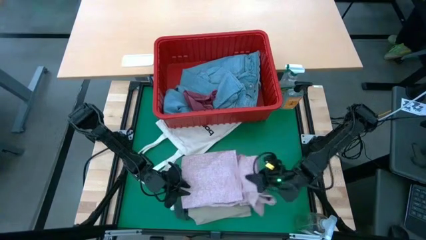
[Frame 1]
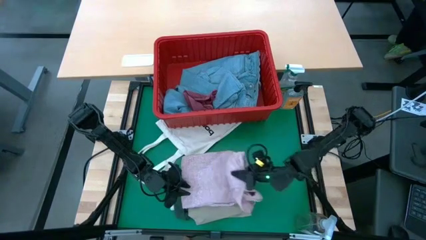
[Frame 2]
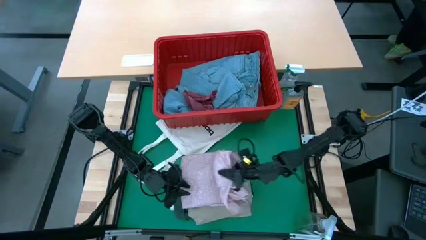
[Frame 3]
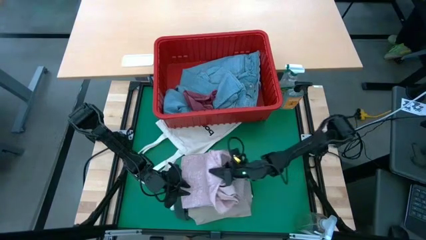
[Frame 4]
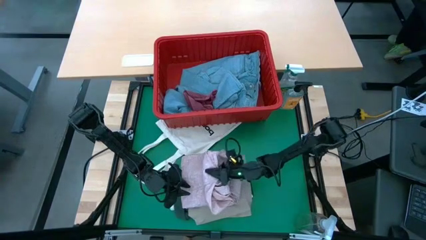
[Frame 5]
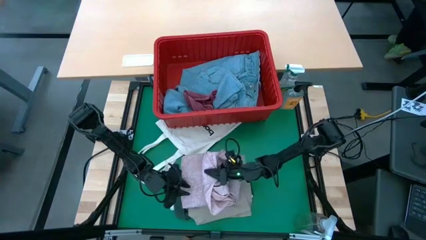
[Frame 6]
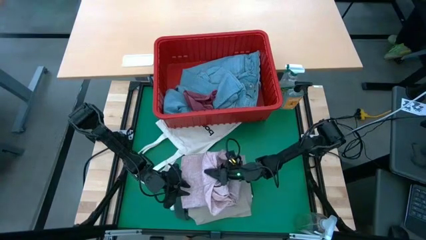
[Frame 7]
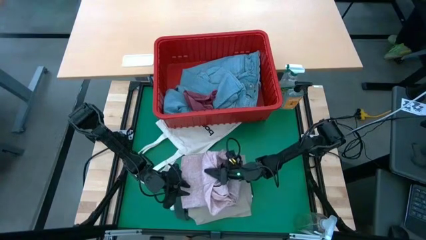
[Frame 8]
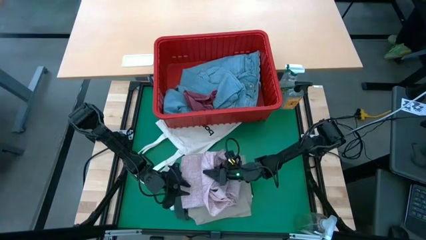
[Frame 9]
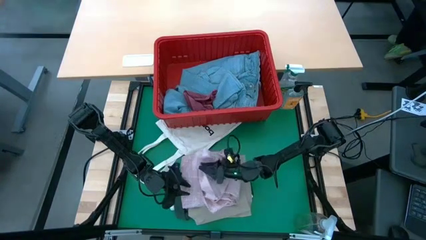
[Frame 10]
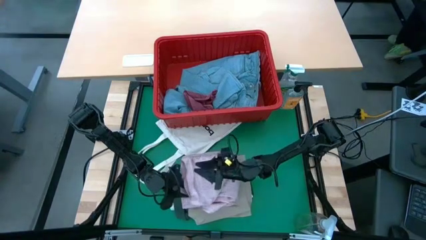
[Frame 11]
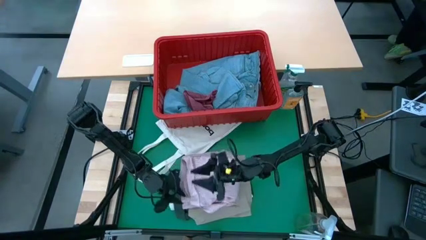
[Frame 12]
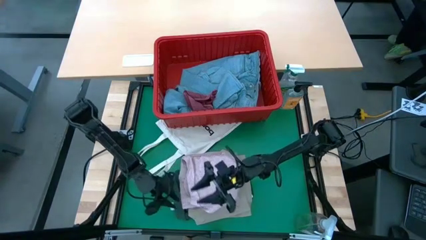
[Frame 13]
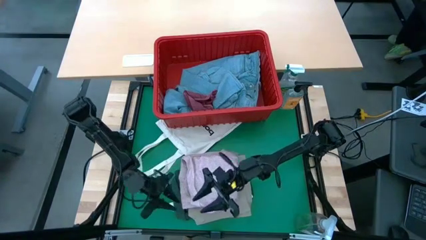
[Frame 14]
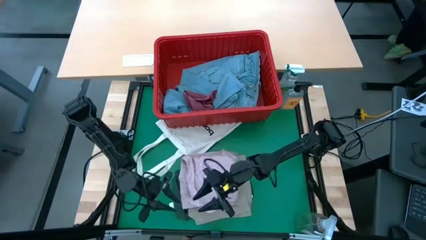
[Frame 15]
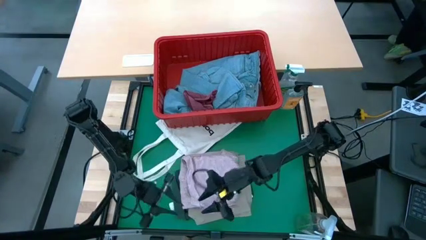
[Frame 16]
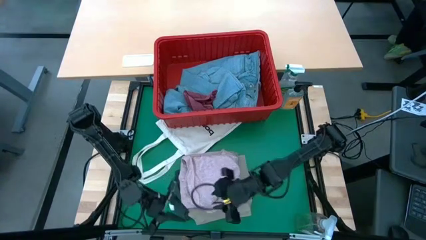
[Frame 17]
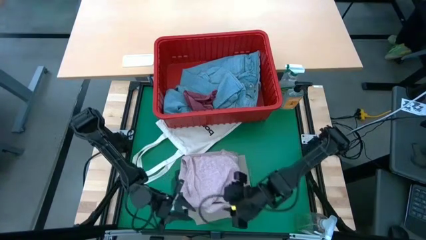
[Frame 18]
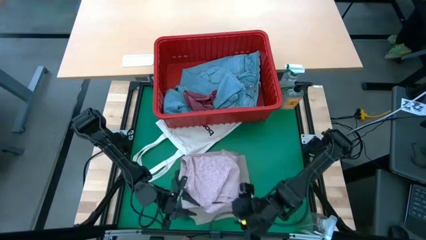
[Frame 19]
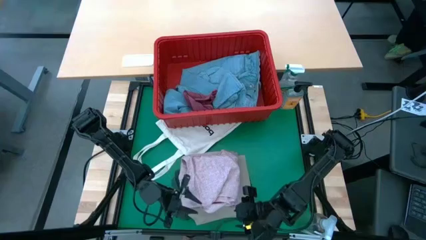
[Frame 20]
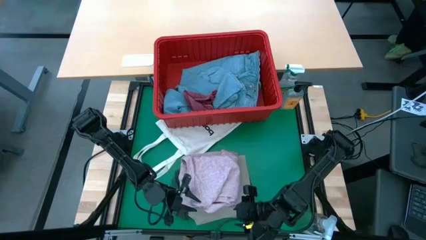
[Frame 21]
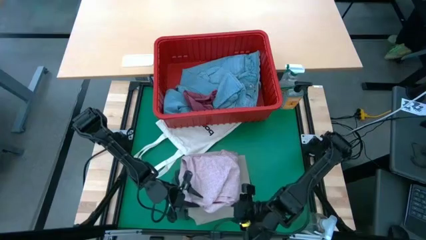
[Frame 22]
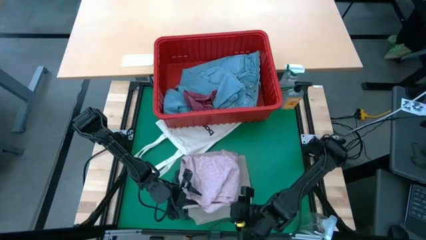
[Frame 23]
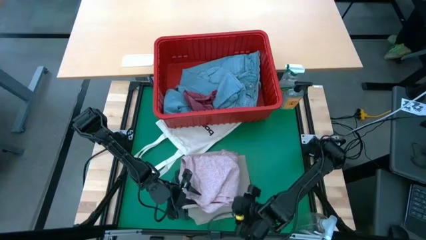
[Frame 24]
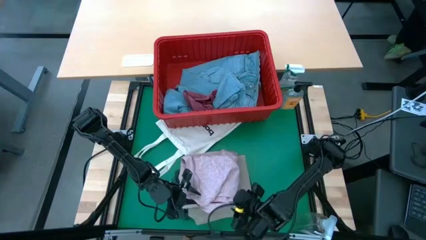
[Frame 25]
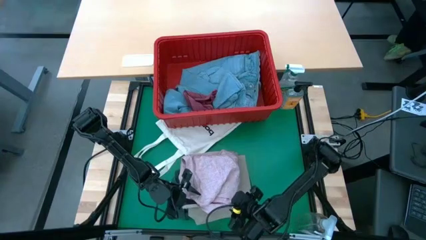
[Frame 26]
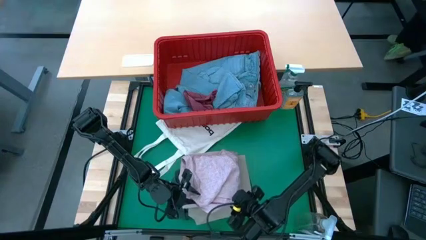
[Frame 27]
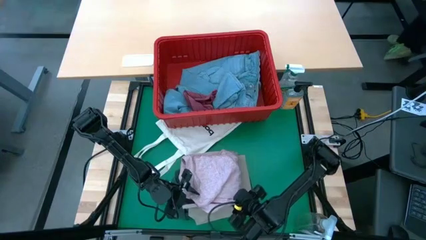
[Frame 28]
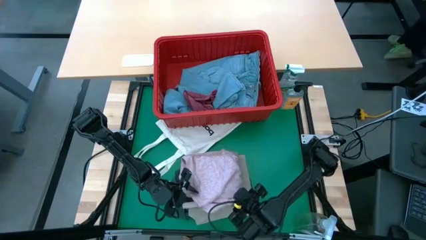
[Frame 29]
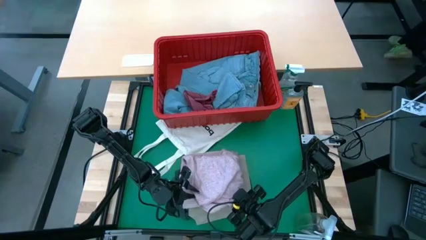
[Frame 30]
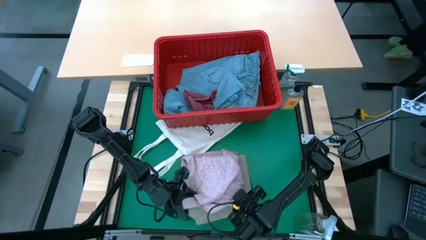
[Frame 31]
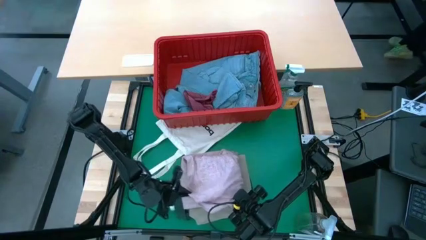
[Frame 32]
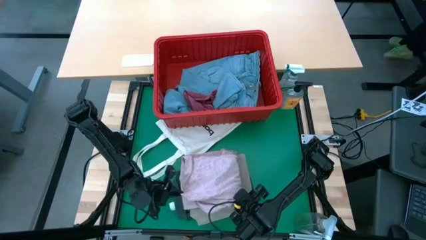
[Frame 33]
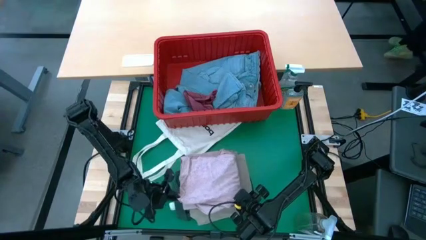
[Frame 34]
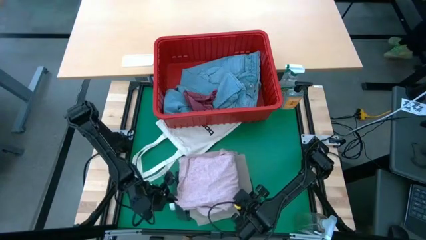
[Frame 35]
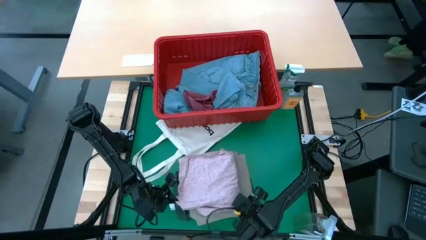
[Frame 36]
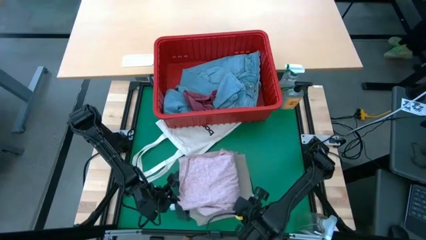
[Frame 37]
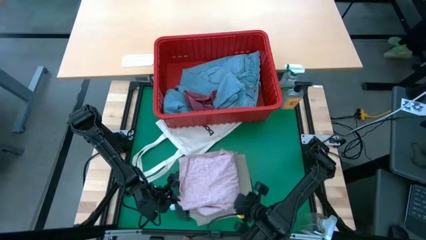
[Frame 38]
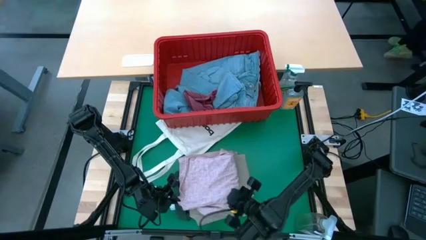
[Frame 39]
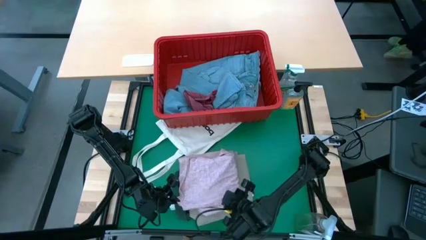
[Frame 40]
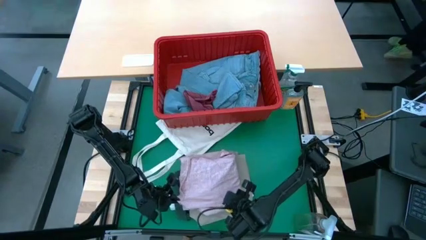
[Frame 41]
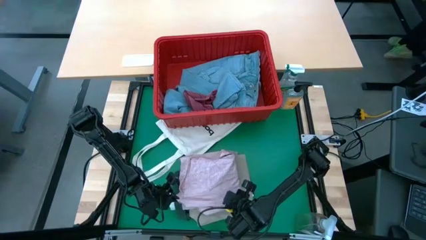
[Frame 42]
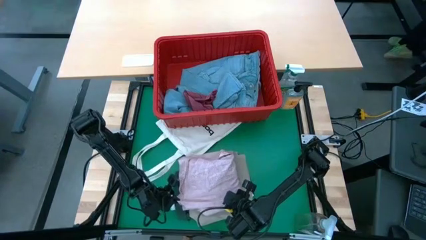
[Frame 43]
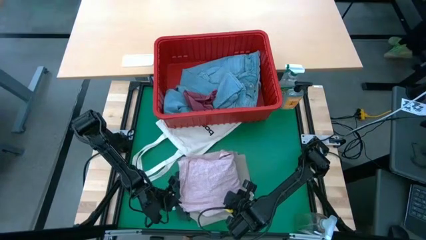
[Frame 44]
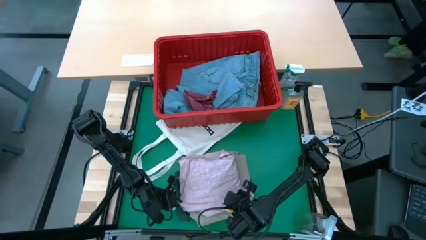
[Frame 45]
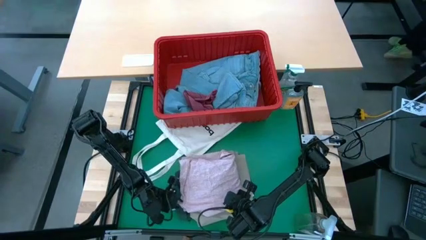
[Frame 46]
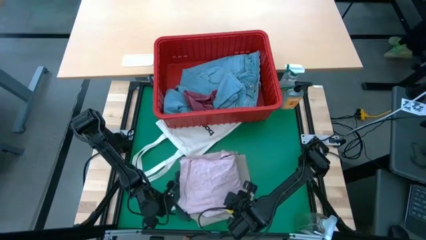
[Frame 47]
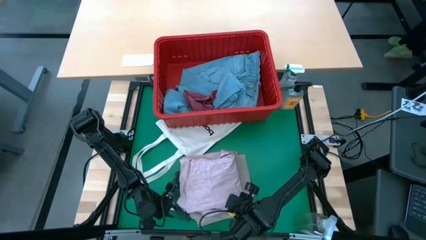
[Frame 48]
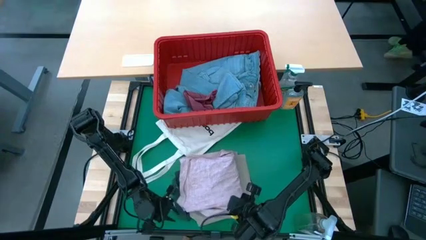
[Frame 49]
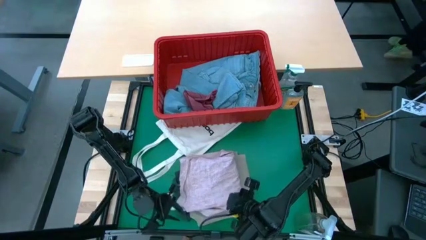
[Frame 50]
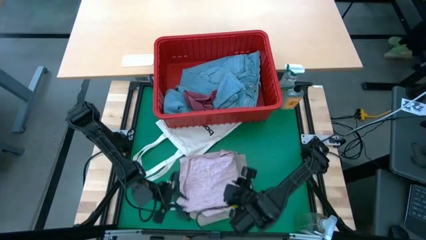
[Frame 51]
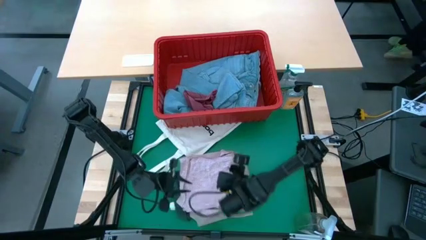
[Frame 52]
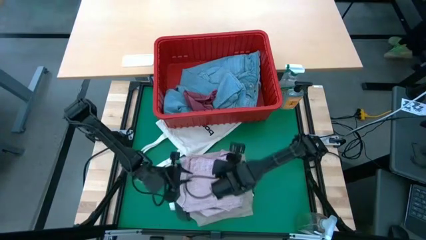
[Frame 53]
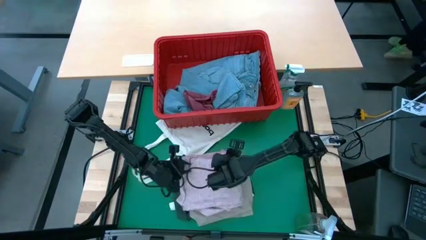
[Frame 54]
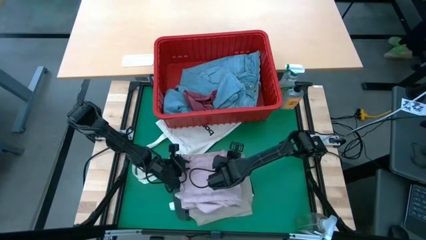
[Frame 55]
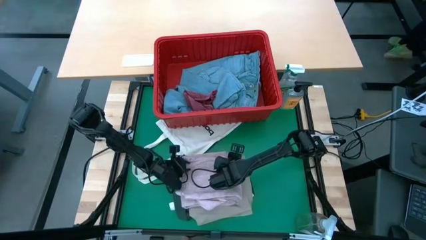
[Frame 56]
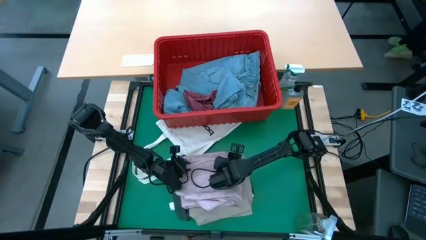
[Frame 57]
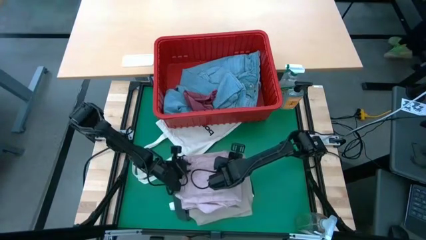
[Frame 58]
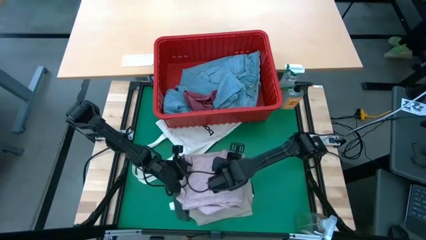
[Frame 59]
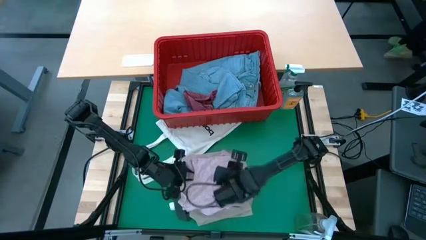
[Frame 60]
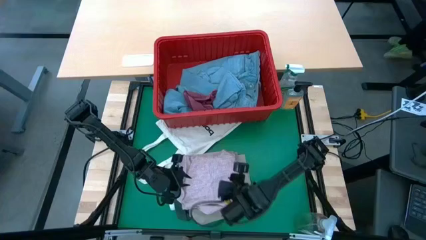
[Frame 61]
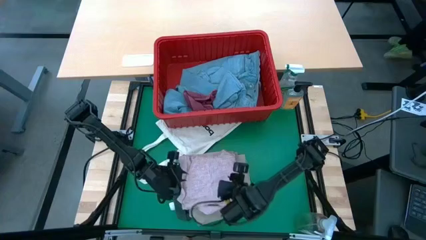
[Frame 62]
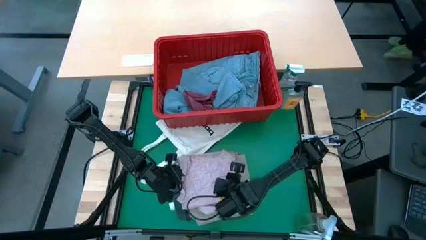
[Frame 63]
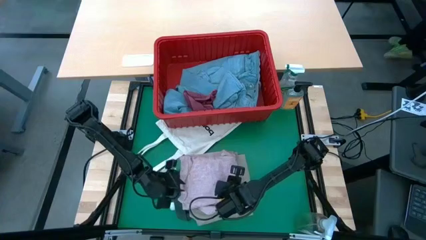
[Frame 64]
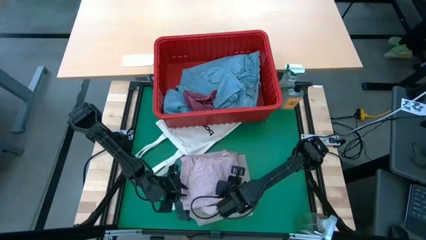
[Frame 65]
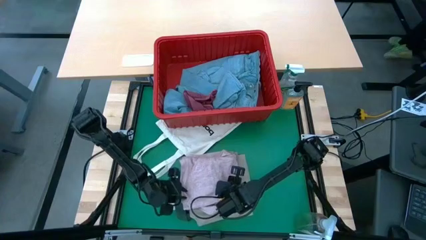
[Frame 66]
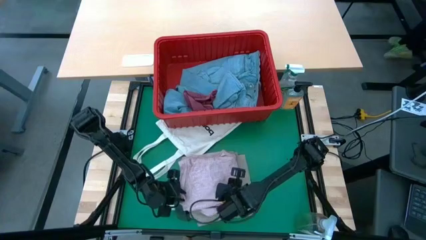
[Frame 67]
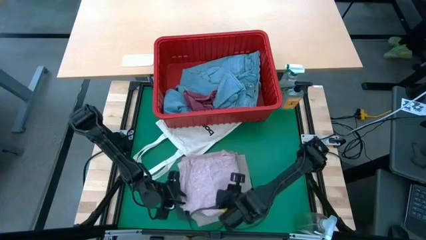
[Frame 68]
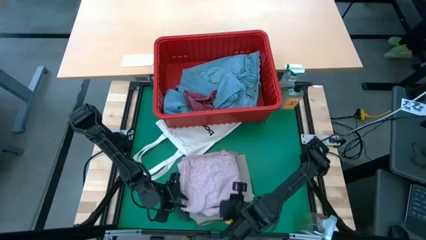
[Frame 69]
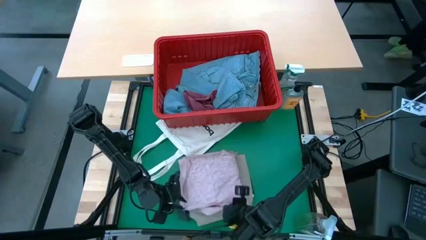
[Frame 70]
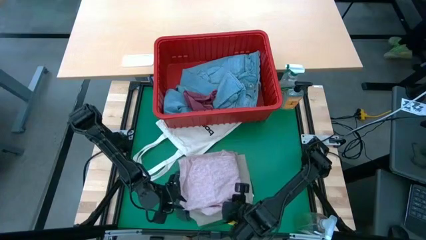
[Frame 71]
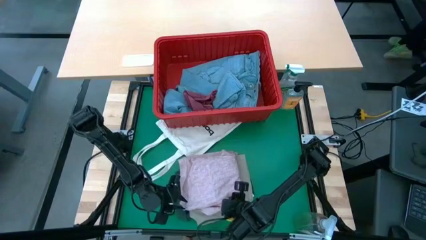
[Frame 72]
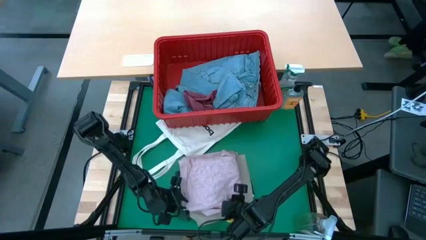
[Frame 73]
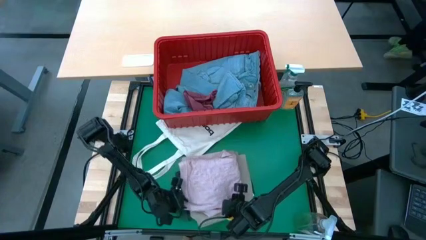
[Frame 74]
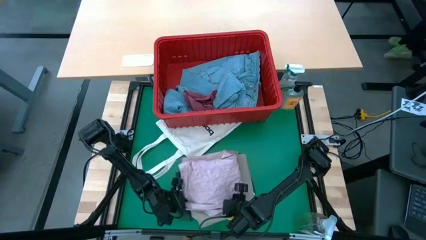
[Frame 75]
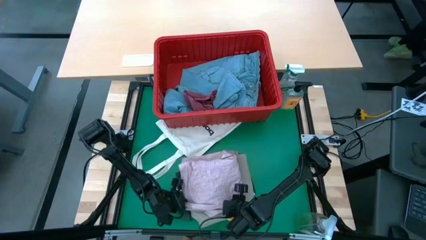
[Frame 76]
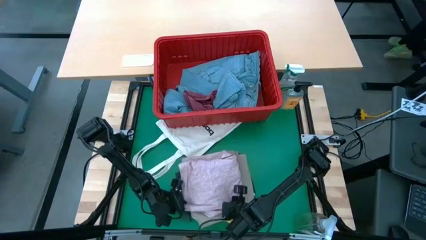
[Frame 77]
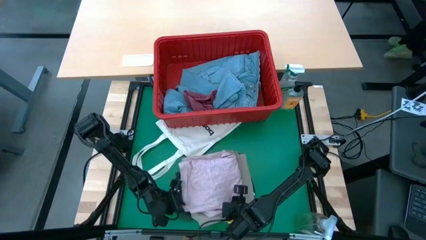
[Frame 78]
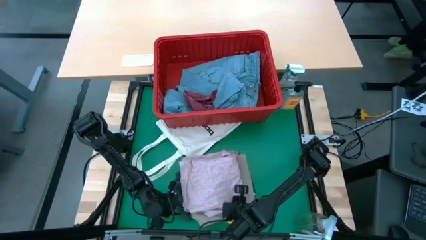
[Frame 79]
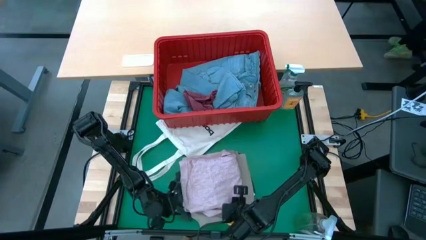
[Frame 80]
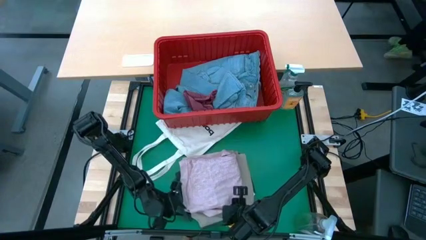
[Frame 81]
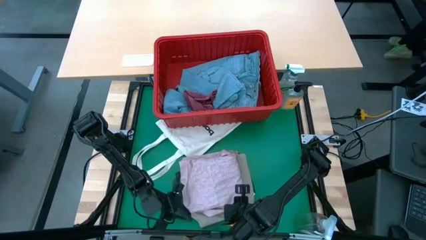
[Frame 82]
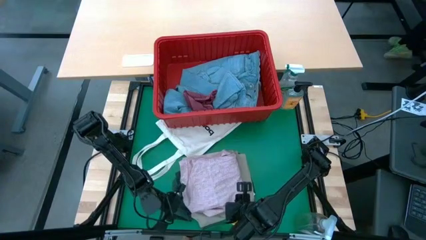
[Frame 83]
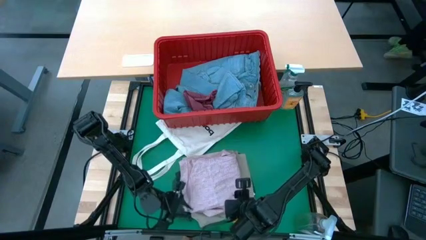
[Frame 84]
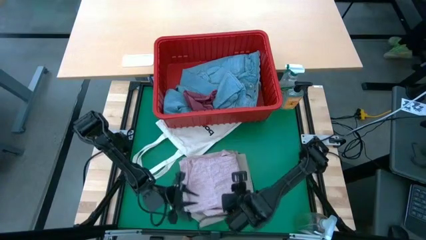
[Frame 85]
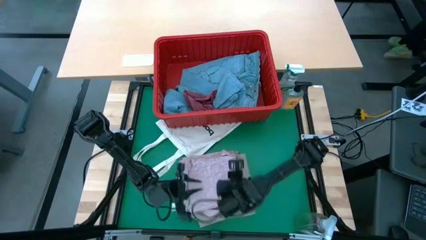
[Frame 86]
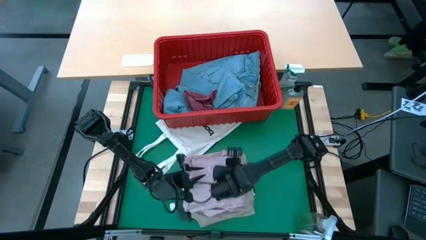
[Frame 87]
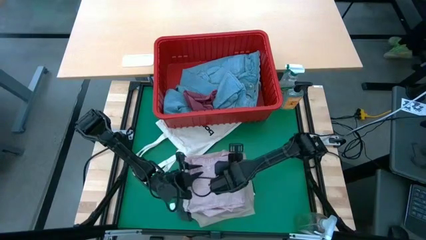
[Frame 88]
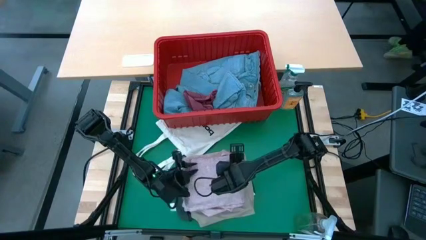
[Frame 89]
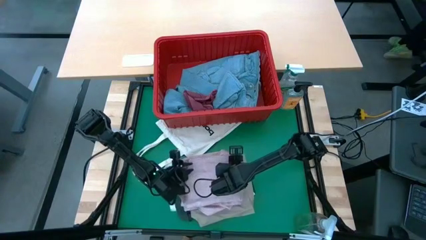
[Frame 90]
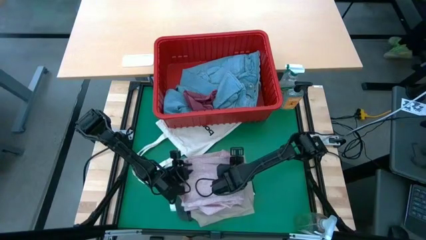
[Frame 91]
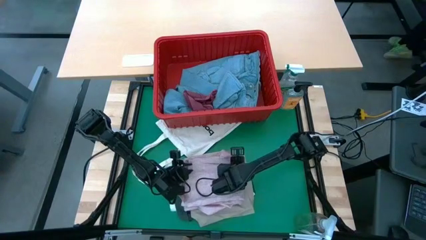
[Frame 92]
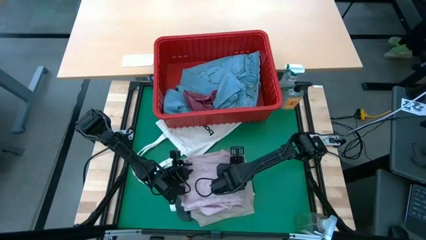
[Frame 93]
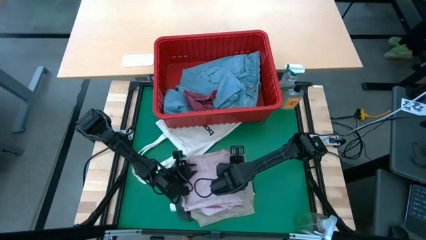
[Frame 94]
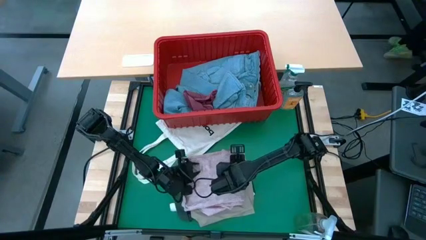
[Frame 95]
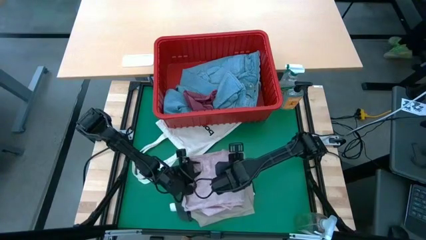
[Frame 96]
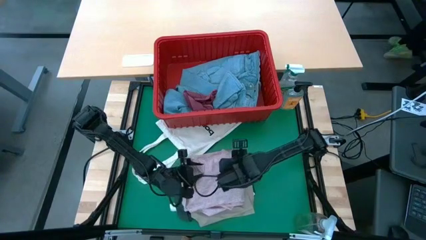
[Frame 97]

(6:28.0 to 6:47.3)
Task: Fold laundry
Fold the pink shirt
